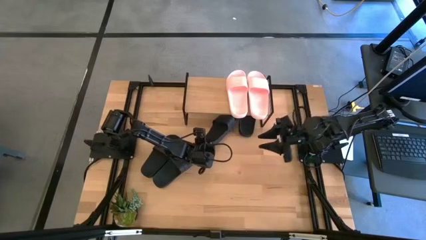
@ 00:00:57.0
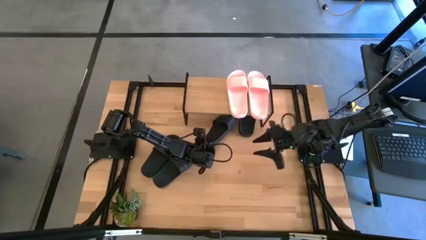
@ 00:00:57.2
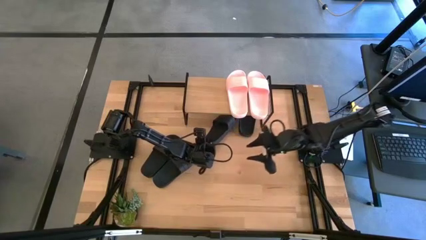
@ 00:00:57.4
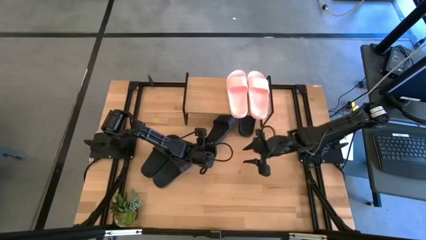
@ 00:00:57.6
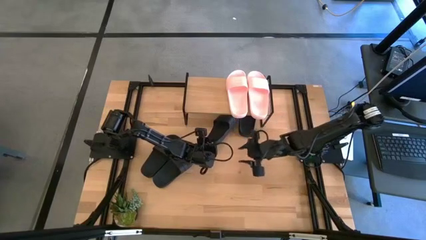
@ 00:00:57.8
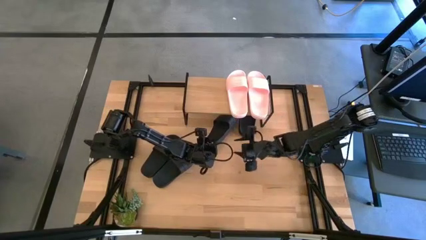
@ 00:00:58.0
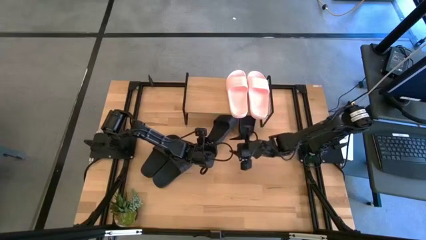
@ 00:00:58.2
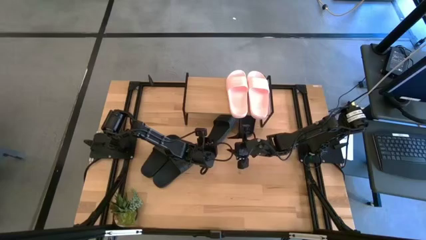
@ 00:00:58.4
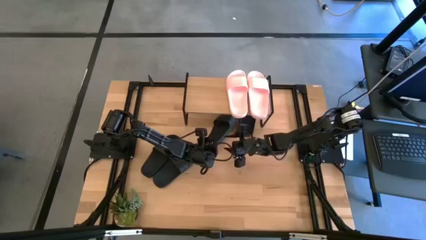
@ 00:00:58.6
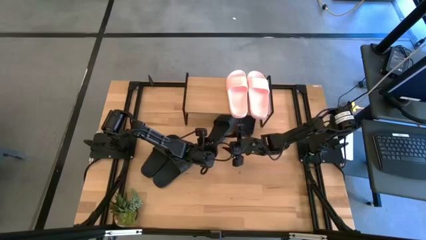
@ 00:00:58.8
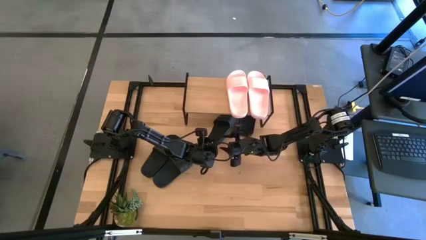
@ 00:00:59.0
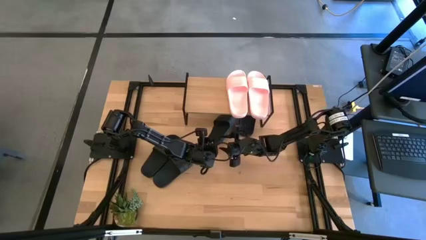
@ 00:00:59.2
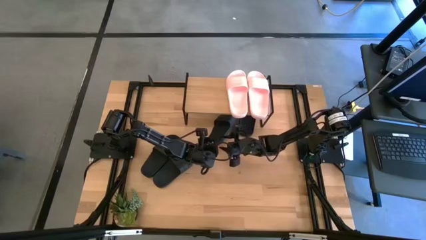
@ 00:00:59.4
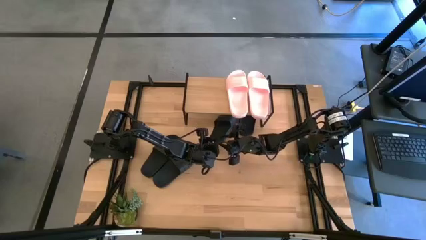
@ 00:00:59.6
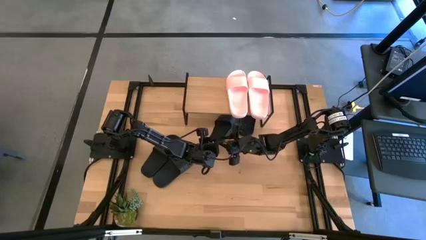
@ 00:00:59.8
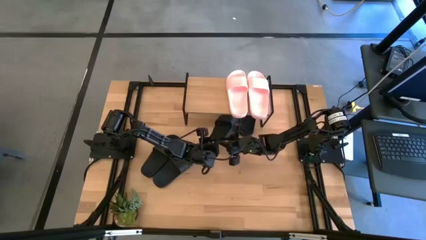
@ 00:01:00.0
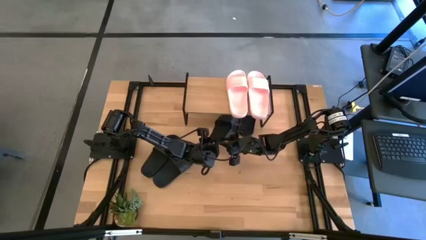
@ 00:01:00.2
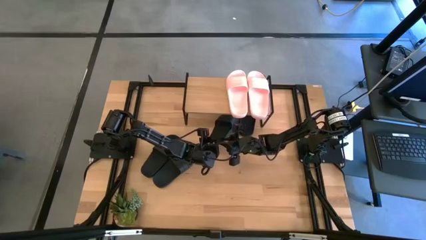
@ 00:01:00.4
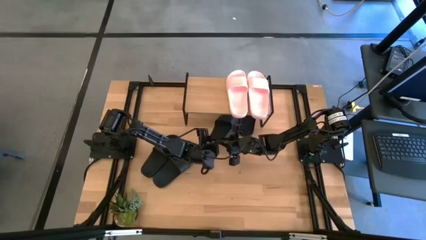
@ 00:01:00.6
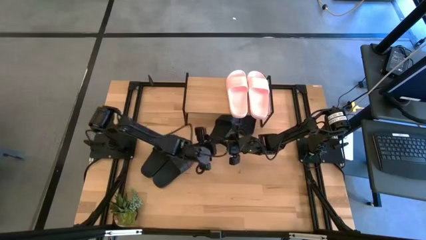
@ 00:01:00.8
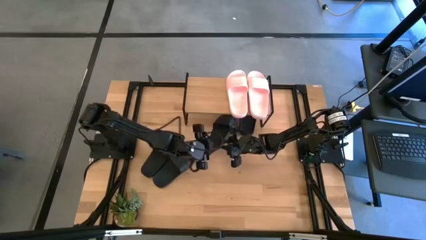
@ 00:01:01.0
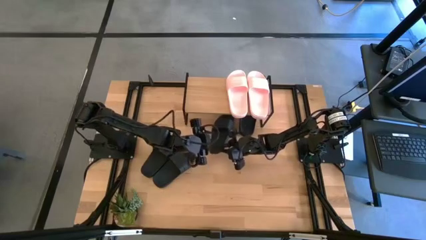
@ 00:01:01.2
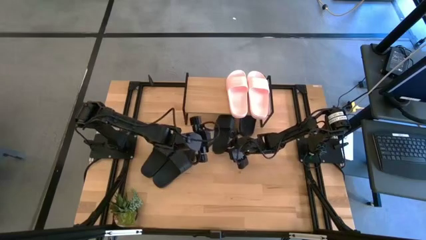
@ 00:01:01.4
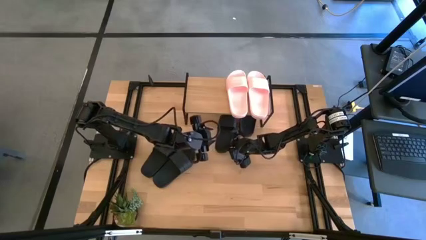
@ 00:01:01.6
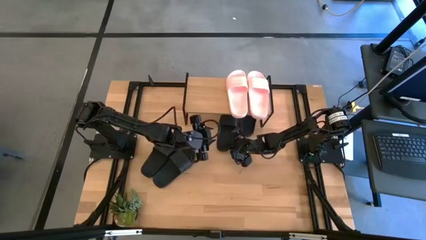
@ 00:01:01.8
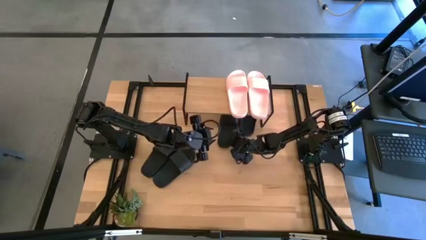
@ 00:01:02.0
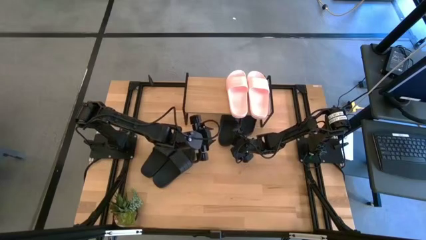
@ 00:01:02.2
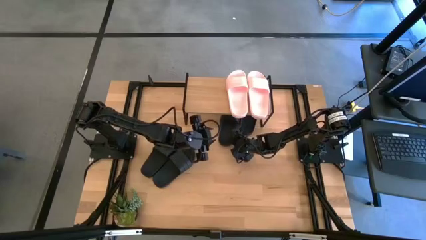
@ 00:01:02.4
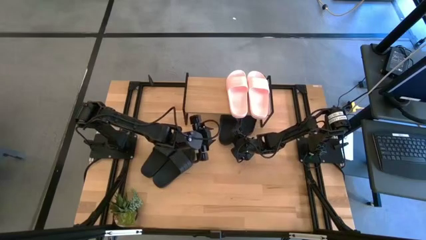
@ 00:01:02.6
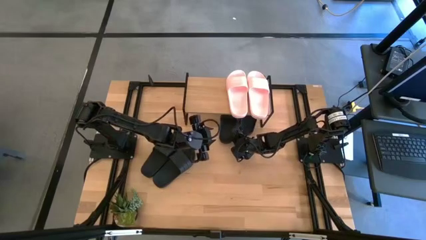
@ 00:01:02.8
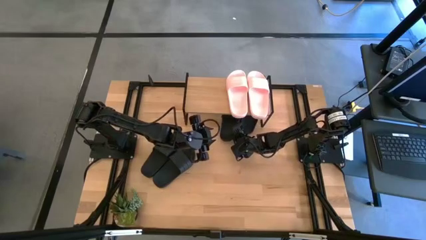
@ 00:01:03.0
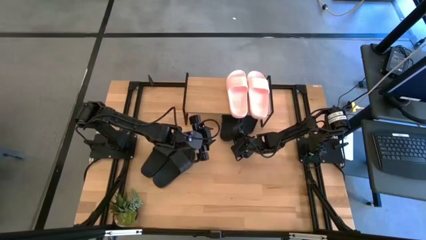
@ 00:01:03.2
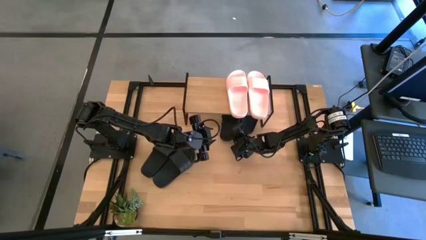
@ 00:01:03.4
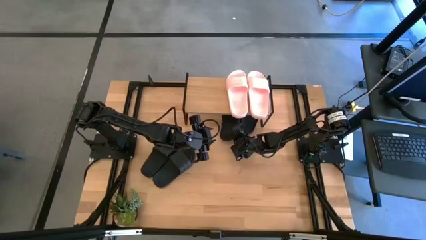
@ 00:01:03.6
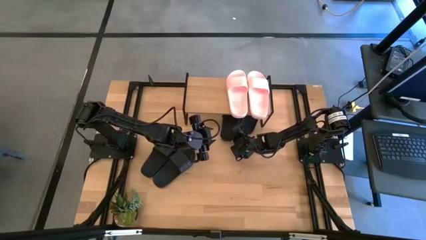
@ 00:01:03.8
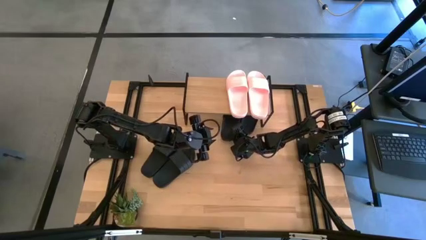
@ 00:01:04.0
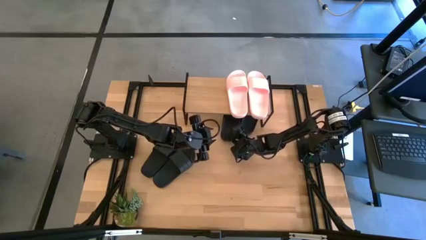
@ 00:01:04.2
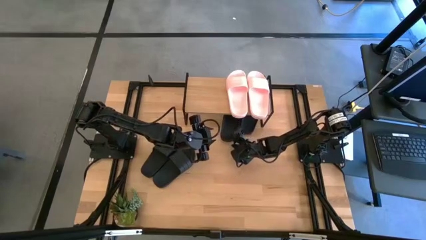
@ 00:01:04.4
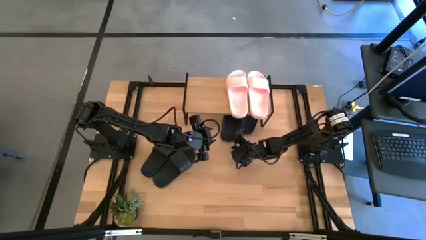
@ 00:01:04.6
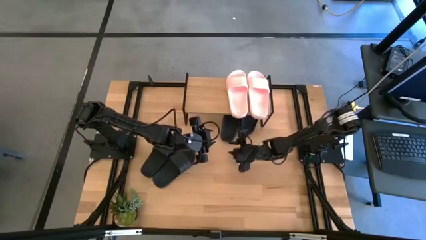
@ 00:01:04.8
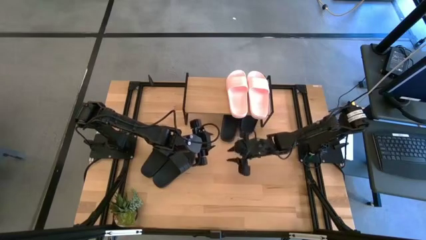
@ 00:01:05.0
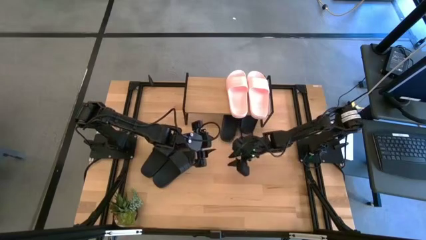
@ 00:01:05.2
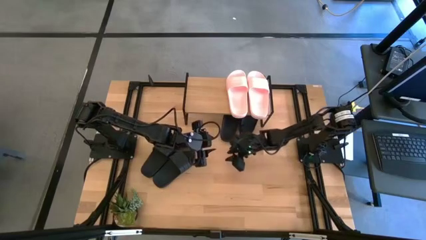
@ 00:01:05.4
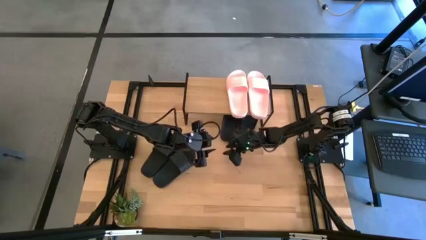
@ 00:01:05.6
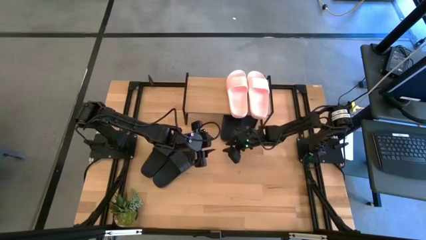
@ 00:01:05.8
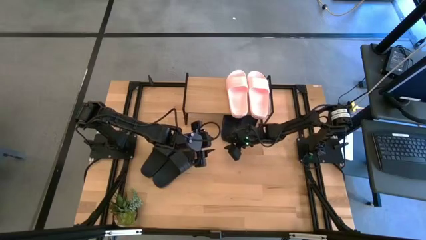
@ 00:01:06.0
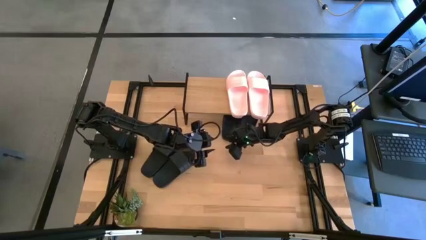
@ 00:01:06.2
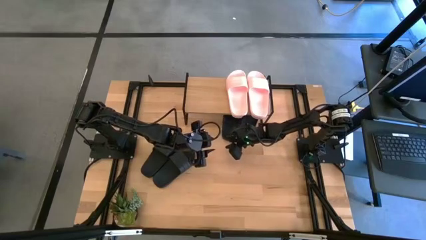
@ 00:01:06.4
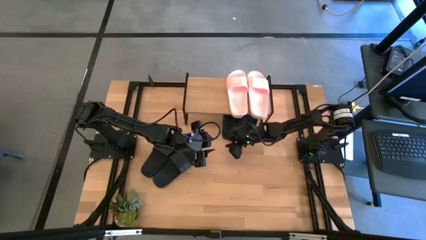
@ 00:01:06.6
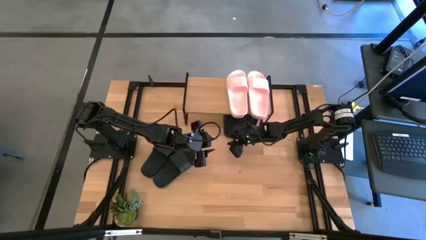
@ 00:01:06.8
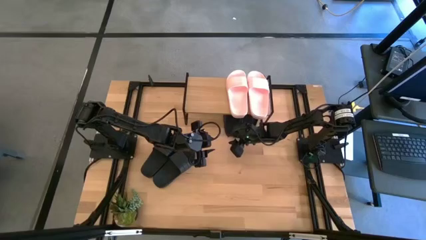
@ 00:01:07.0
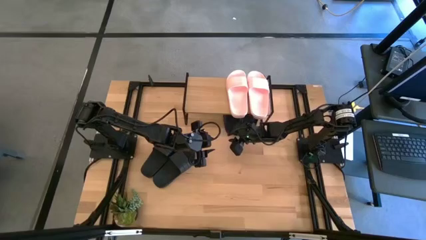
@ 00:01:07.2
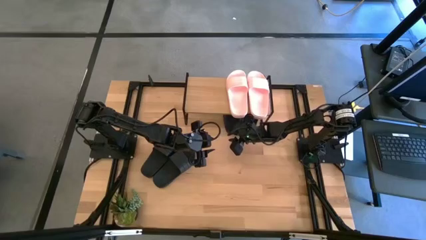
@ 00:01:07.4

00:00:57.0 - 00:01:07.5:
Task: Pick and place slides into the shelf
Put the right black slide under the shelf
